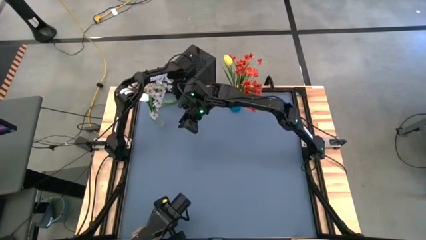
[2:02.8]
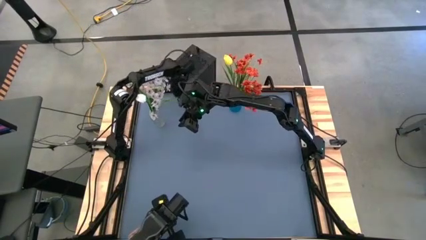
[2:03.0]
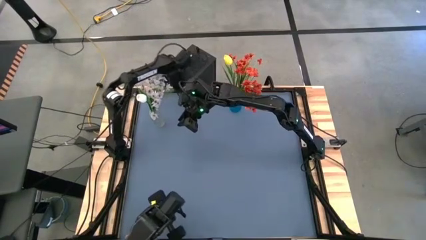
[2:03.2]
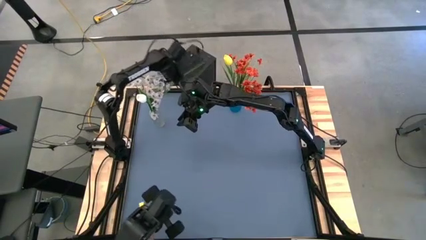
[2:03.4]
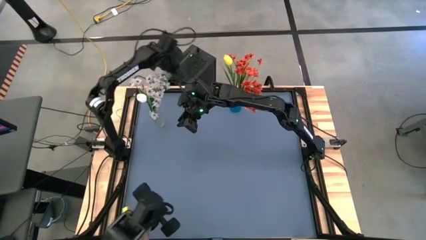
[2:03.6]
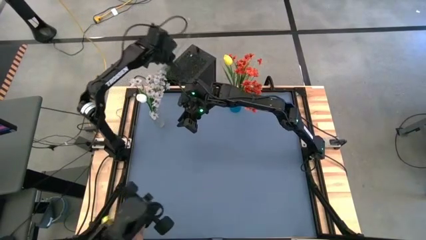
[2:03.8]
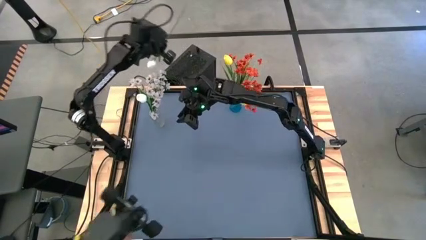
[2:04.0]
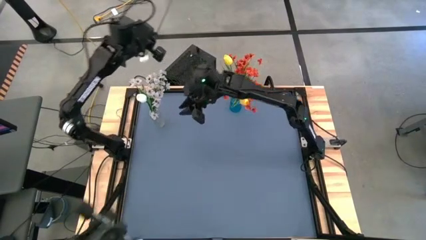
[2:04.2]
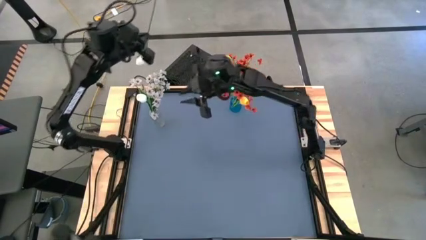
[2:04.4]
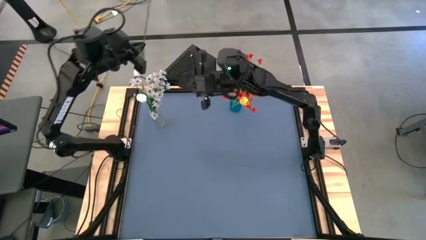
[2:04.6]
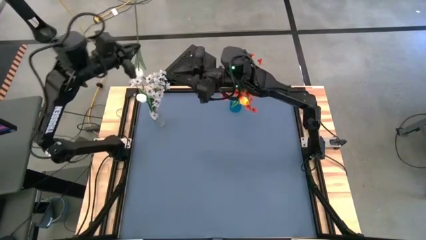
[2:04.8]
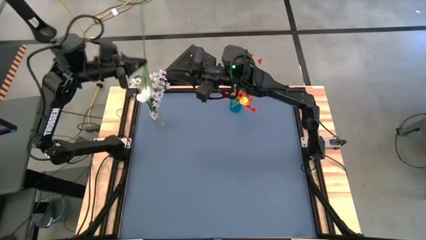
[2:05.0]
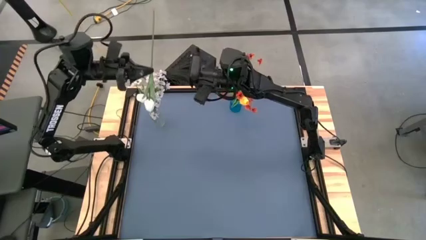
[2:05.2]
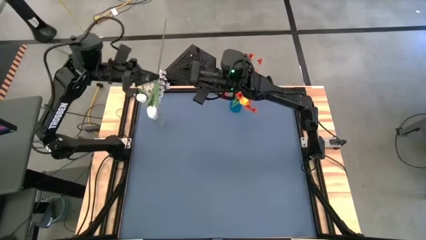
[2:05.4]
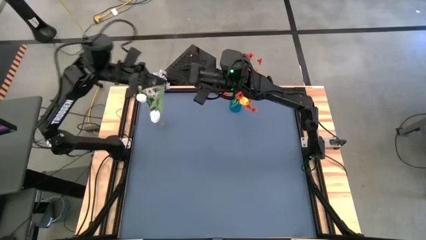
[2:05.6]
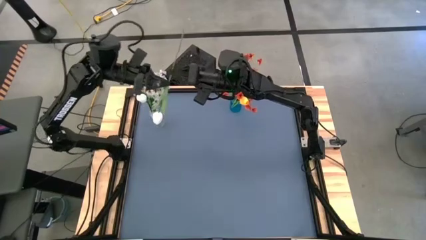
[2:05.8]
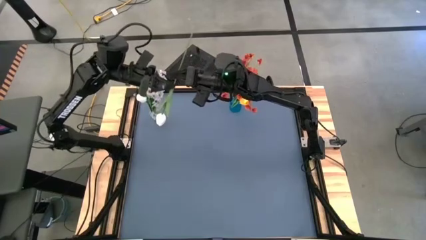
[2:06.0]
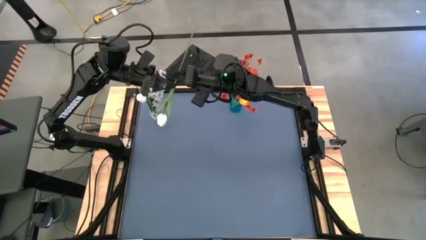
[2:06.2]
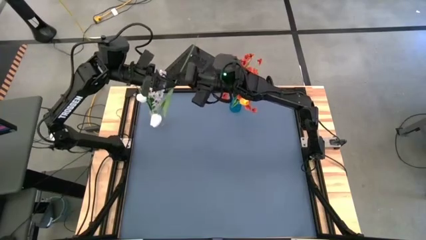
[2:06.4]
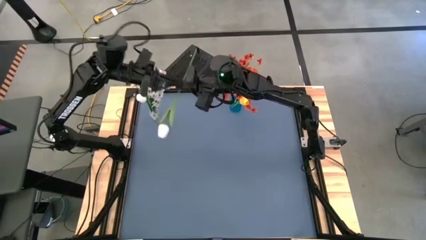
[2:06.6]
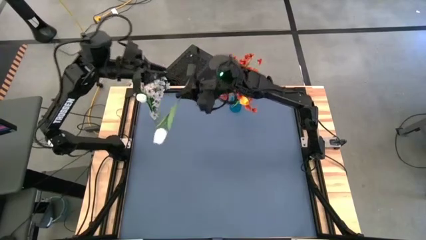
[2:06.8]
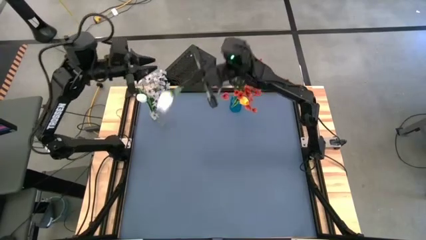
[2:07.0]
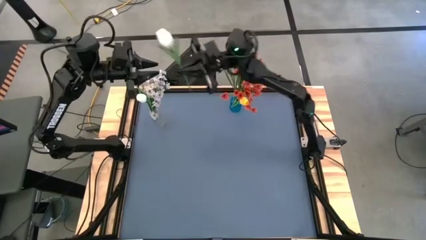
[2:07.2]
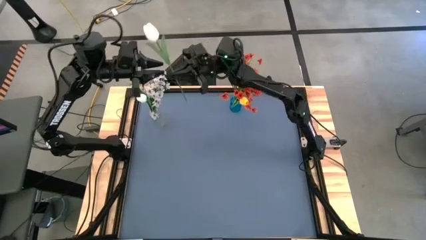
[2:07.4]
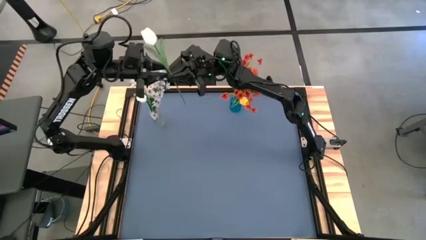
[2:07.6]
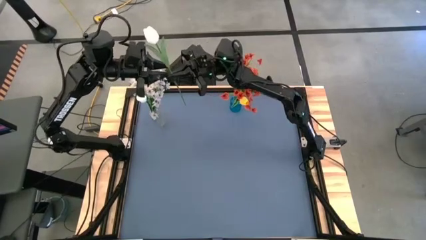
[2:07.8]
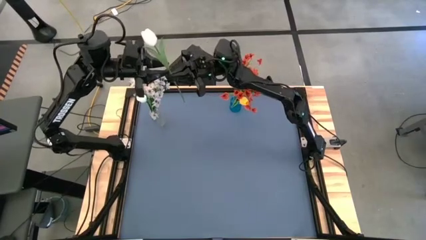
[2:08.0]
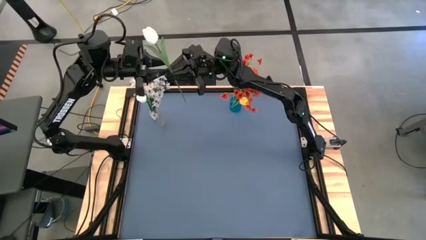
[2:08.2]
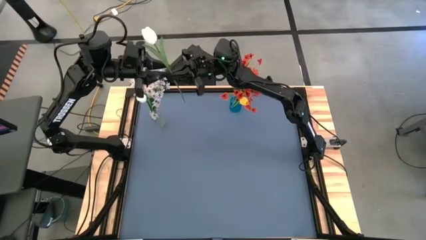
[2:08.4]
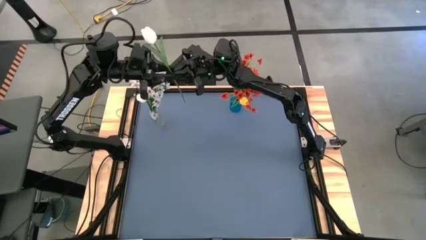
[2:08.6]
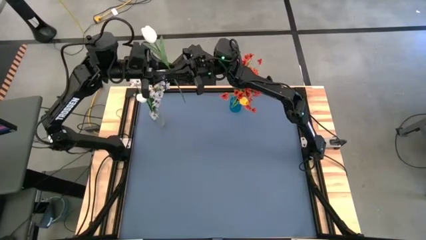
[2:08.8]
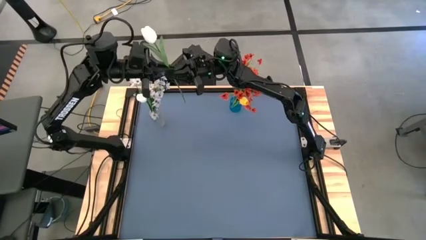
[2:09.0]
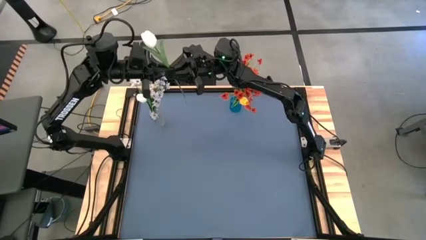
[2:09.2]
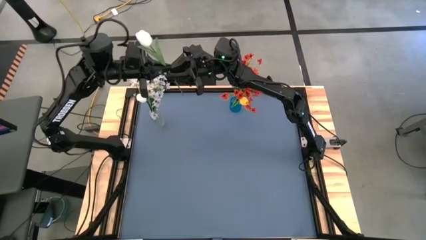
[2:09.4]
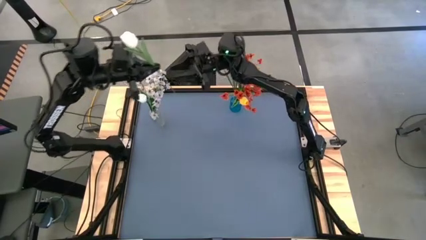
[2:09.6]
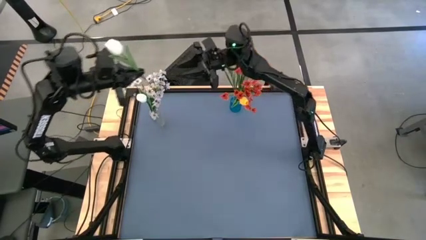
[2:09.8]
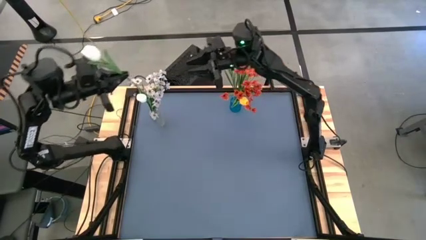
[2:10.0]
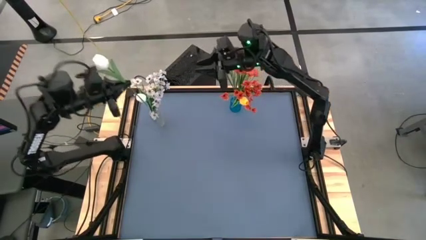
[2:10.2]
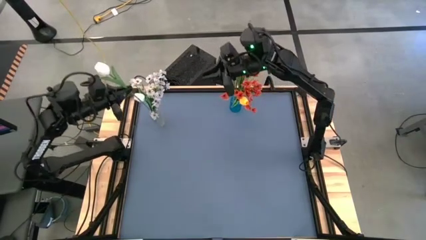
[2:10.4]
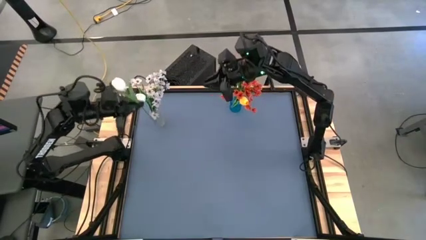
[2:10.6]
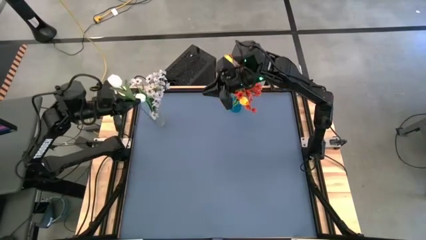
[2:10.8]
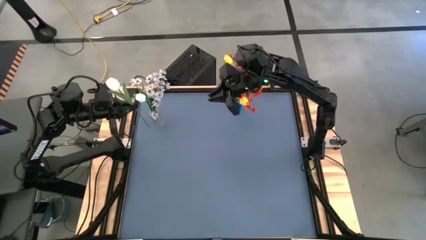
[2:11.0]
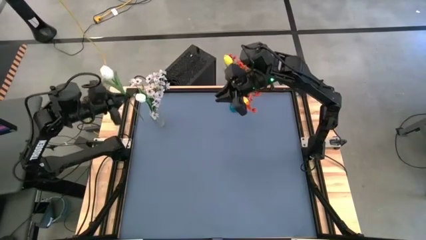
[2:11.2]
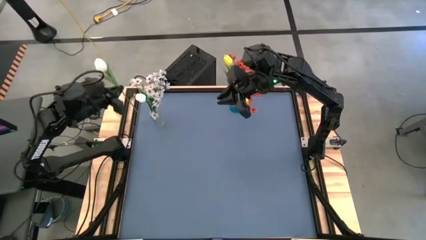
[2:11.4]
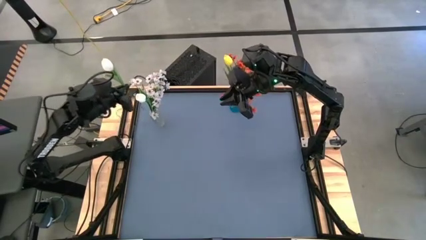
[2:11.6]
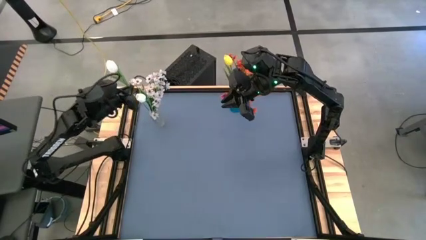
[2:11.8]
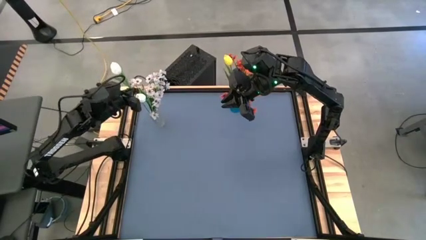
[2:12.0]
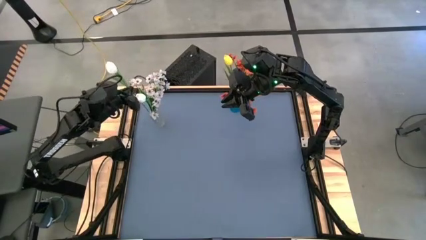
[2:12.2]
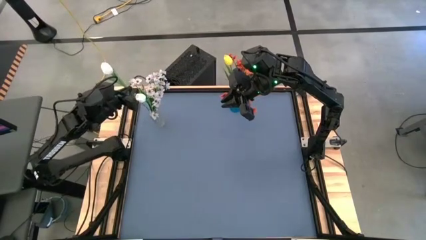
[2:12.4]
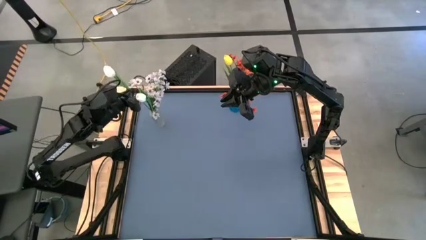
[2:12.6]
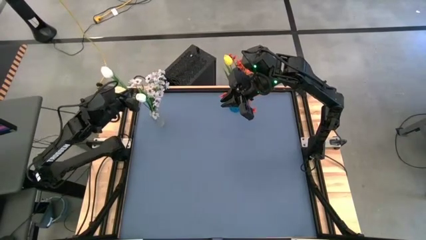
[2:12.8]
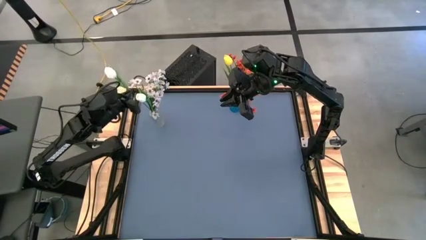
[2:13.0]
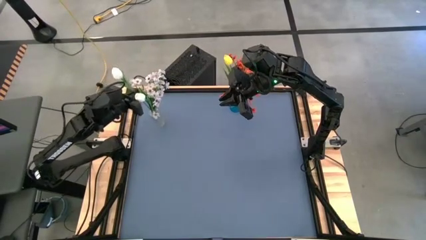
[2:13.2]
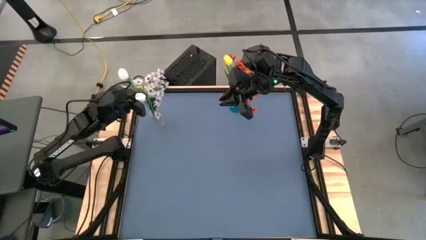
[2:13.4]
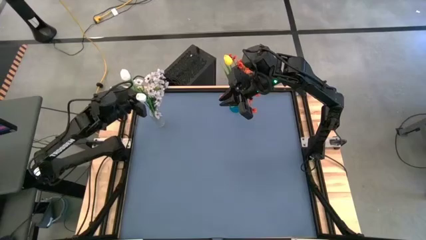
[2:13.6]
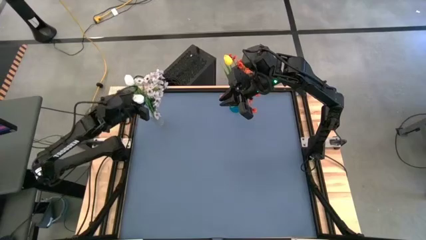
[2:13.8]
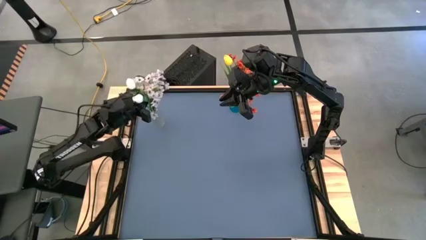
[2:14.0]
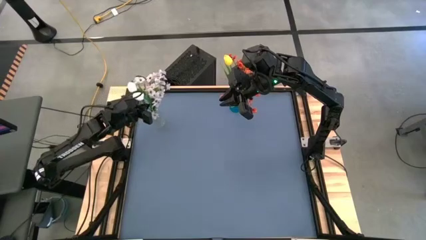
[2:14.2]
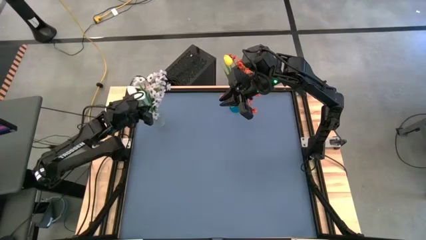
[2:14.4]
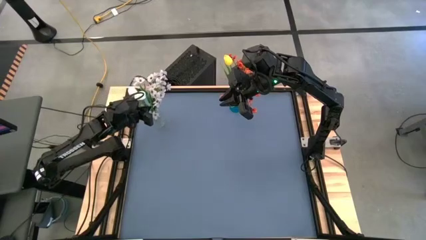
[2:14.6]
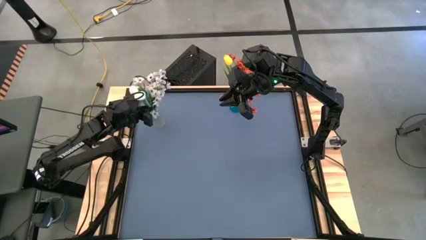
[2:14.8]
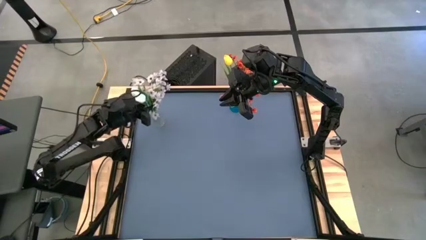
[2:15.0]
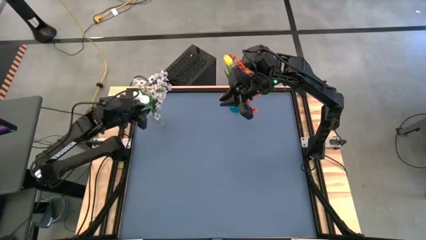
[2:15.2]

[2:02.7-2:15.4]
Task: Sort flowers into vase by color
Put the white tulip into the transparent vase

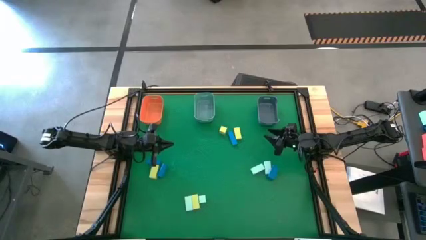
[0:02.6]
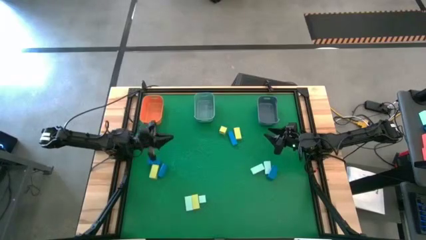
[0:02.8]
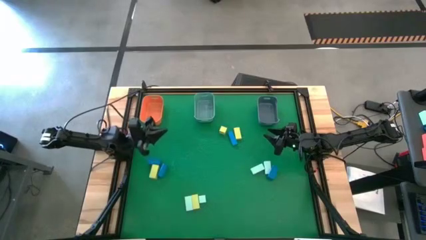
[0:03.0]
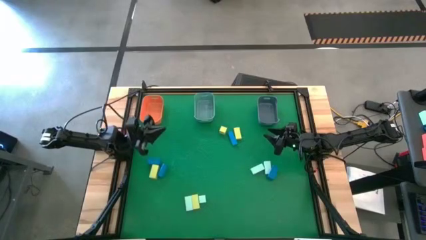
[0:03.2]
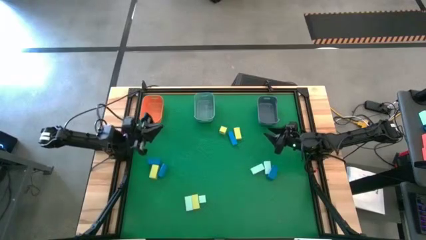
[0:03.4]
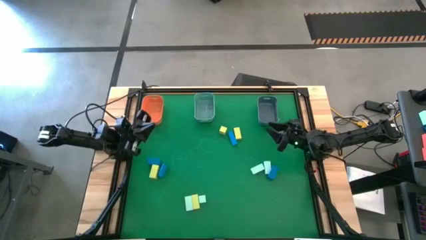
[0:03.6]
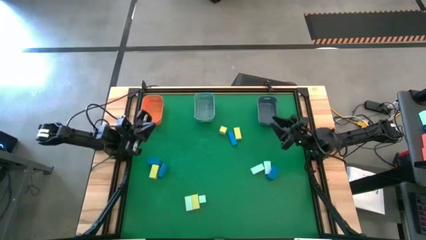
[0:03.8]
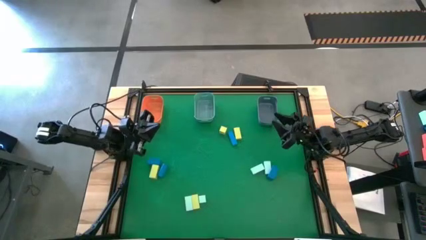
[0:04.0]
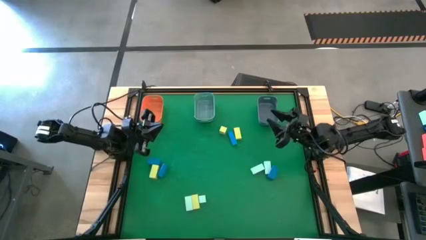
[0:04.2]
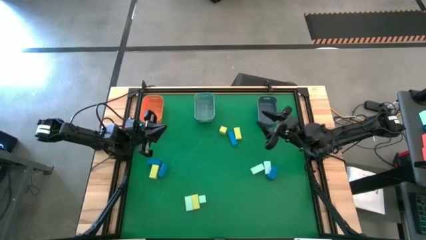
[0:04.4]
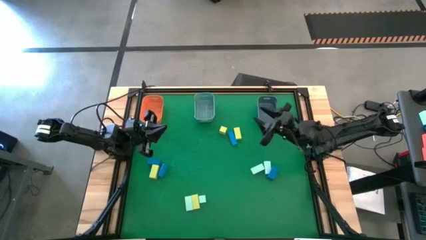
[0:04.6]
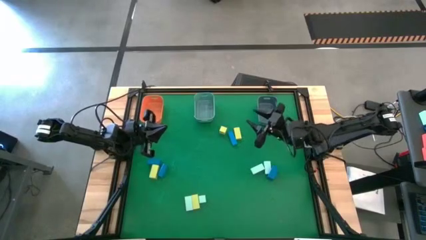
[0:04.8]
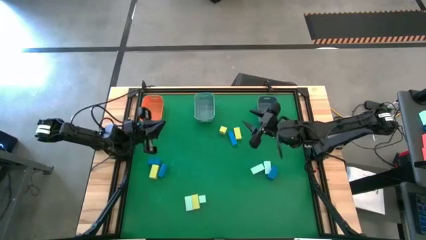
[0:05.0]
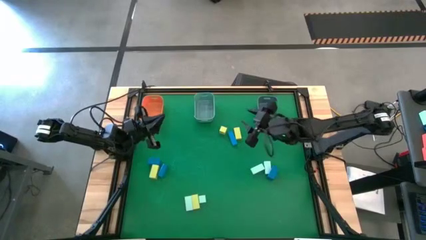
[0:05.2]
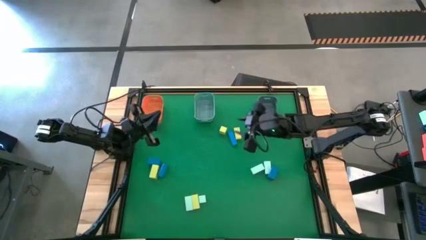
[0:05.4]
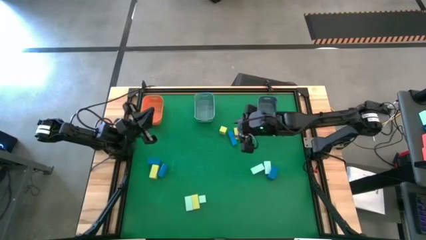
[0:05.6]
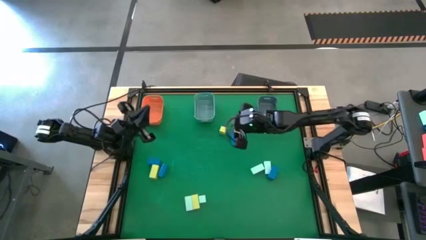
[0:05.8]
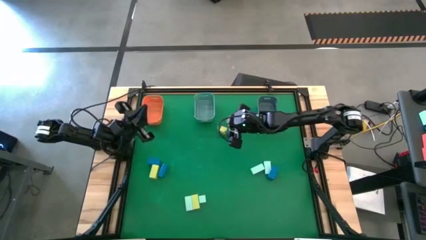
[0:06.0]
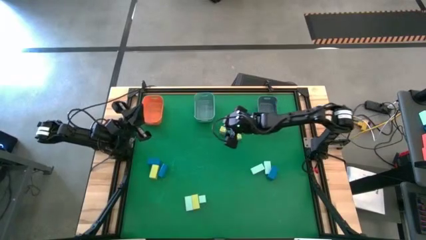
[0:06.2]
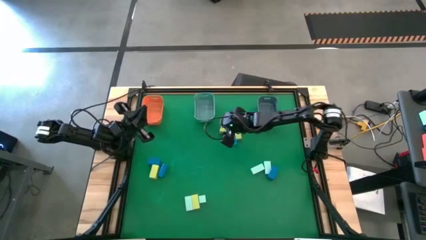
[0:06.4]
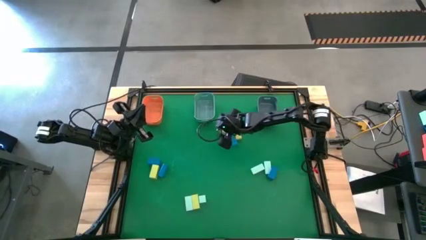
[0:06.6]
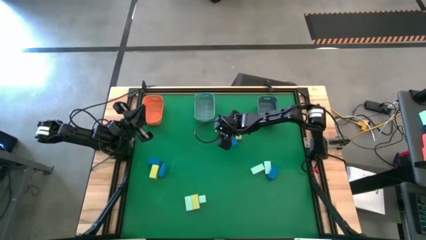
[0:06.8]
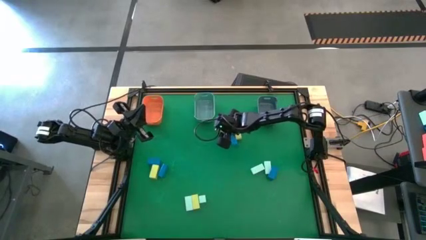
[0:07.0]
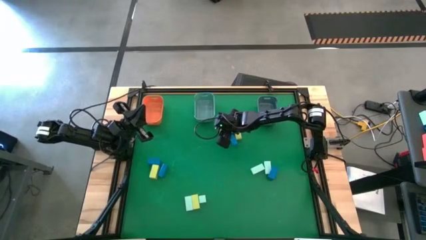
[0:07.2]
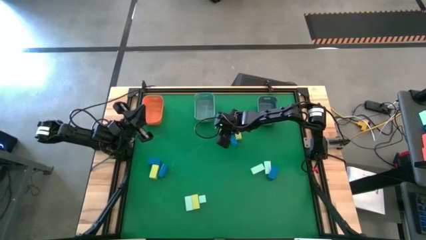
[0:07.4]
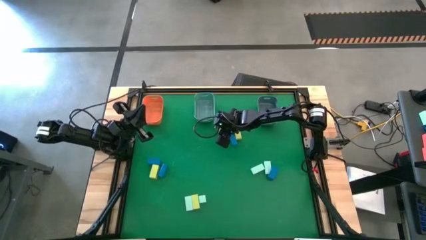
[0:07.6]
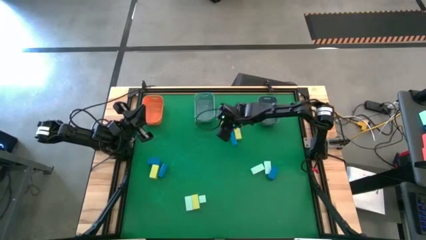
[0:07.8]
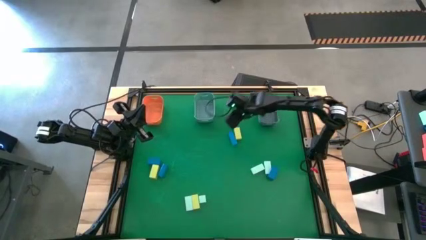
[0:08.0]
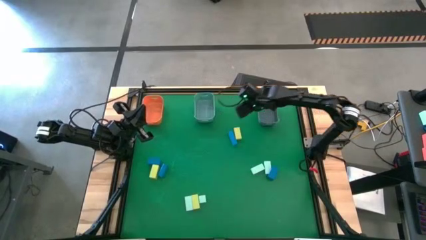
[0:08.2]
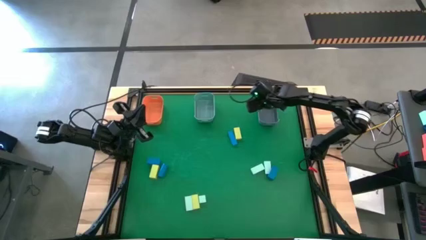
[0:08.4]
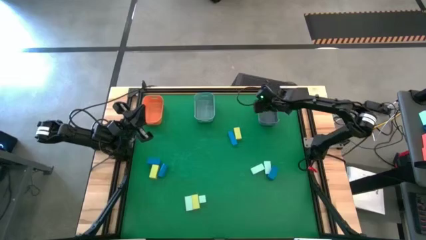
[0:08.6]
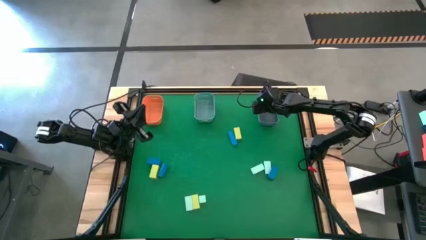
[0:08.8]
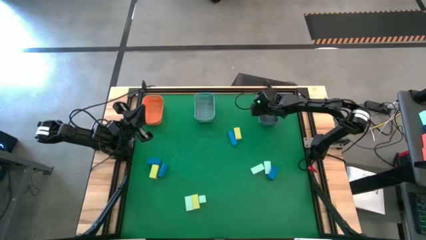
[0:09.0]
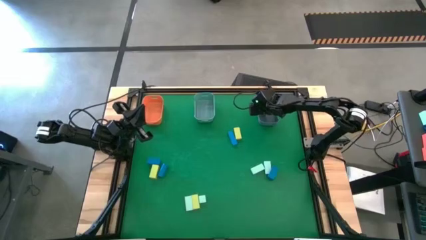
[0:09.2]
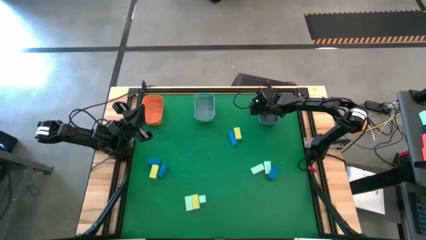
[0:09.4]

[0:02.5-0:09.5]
Task: Sort & place blocks by color
Put the yellow block into the gray bin
